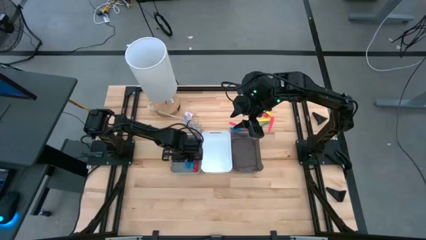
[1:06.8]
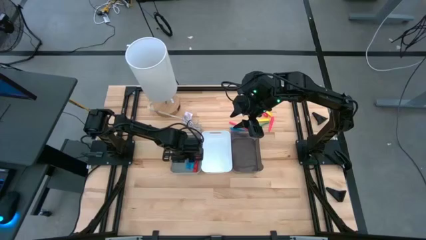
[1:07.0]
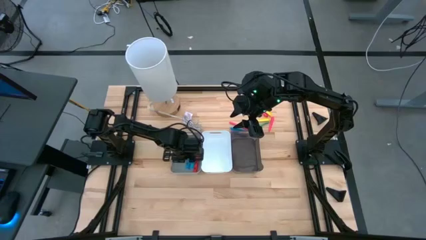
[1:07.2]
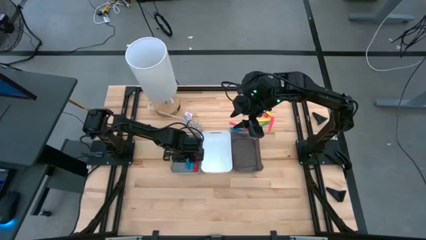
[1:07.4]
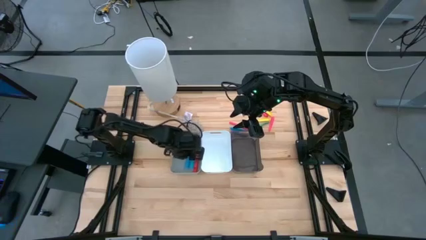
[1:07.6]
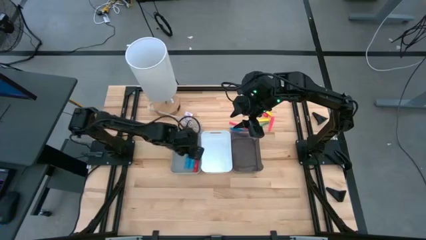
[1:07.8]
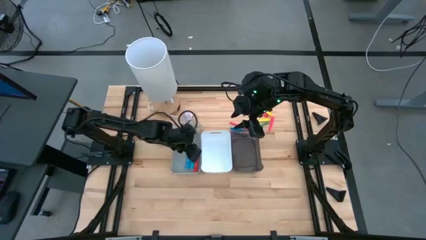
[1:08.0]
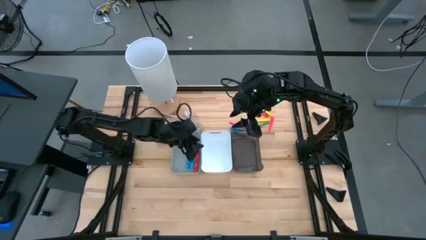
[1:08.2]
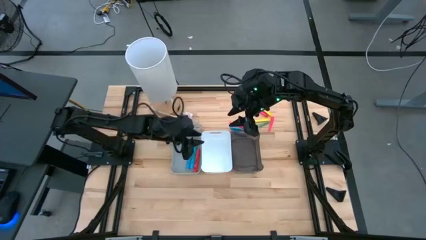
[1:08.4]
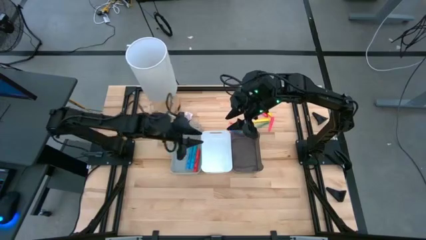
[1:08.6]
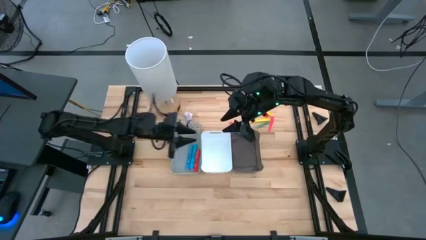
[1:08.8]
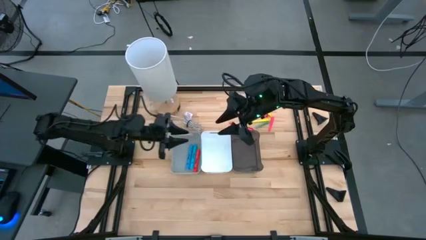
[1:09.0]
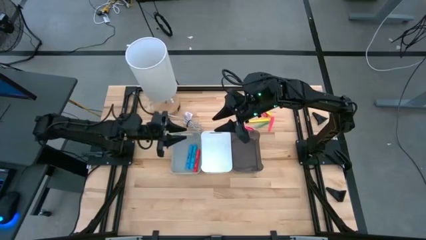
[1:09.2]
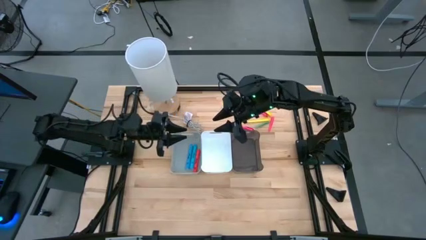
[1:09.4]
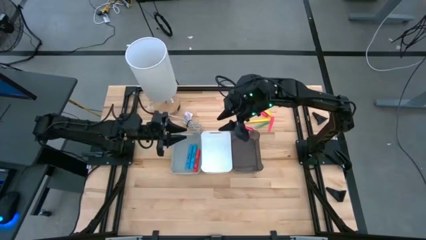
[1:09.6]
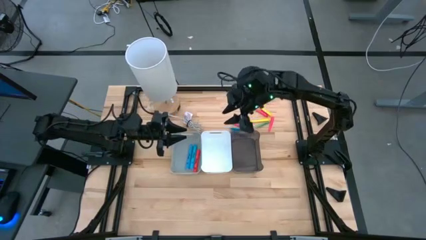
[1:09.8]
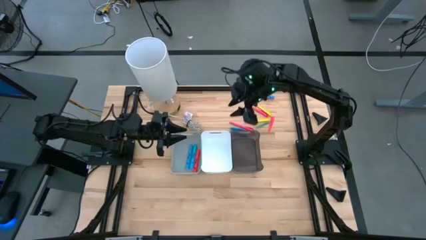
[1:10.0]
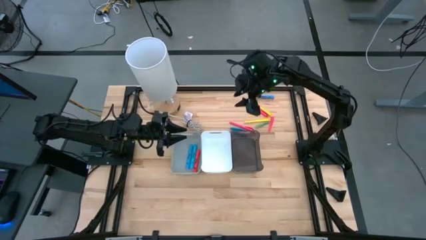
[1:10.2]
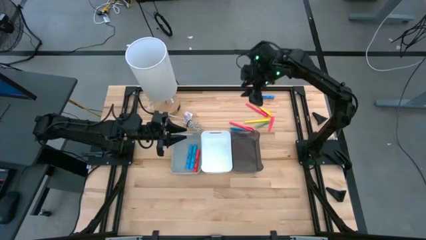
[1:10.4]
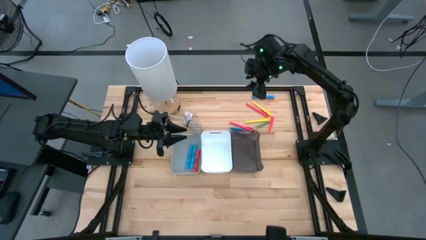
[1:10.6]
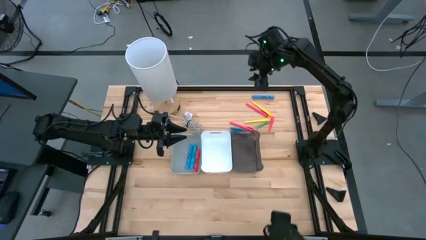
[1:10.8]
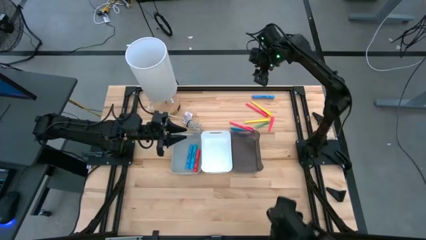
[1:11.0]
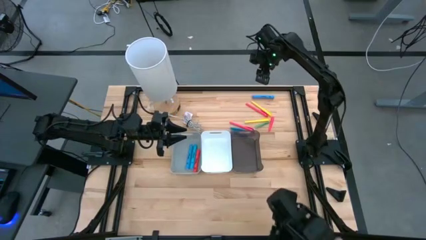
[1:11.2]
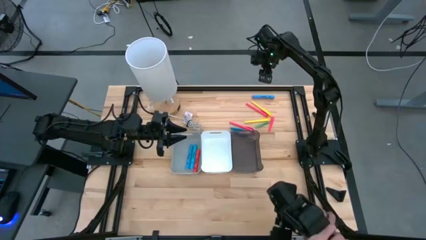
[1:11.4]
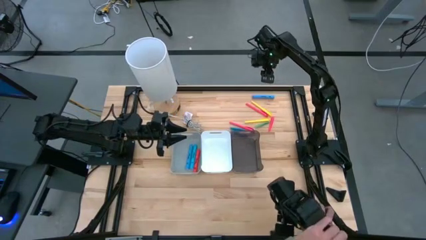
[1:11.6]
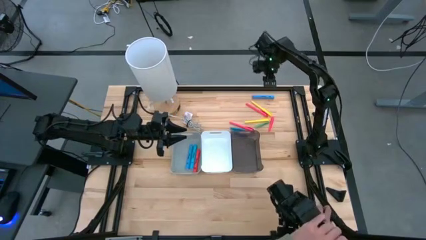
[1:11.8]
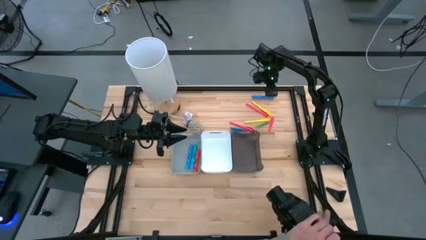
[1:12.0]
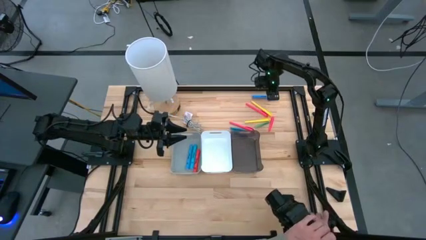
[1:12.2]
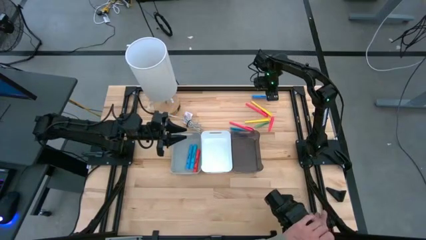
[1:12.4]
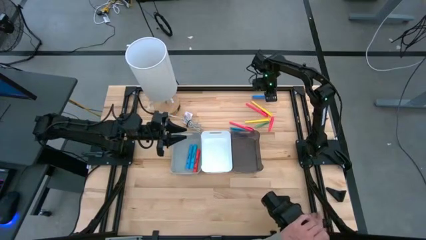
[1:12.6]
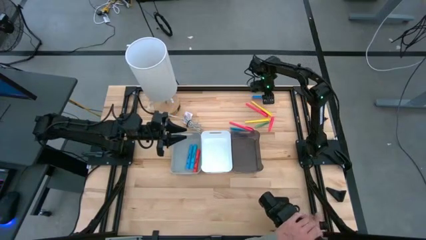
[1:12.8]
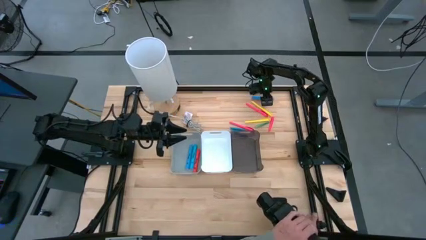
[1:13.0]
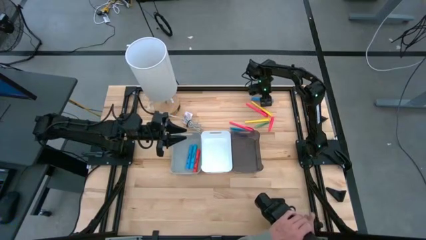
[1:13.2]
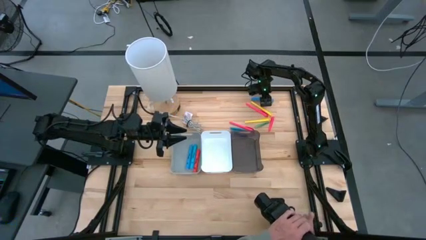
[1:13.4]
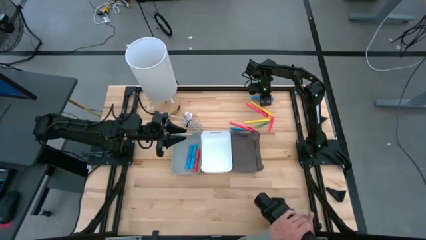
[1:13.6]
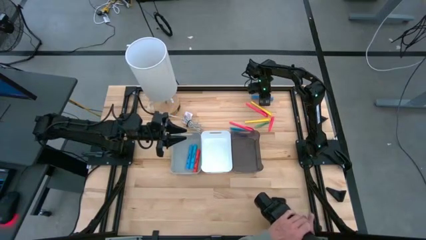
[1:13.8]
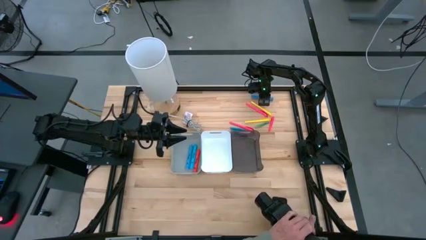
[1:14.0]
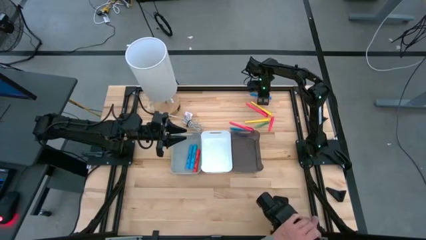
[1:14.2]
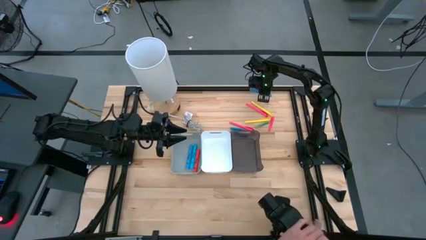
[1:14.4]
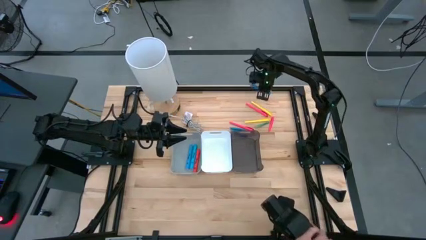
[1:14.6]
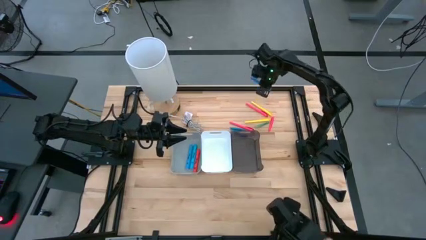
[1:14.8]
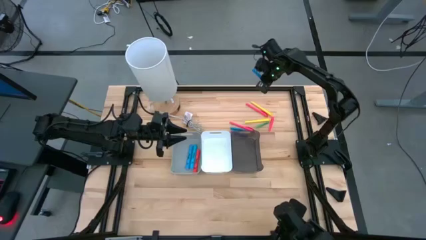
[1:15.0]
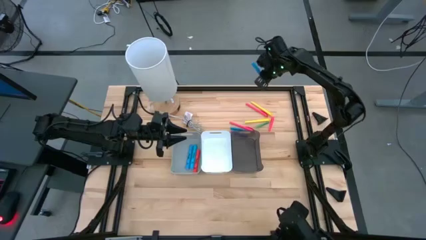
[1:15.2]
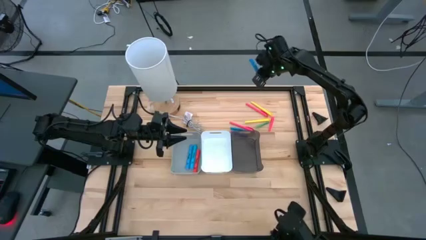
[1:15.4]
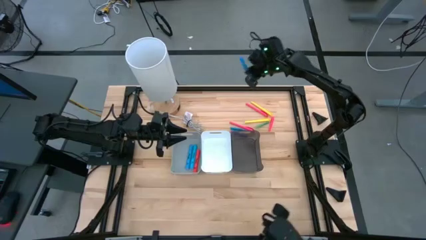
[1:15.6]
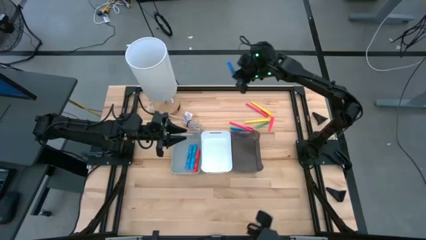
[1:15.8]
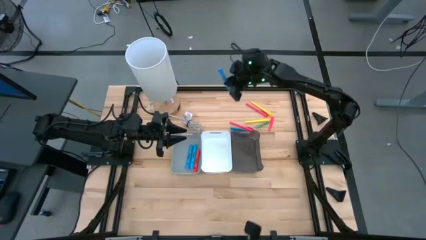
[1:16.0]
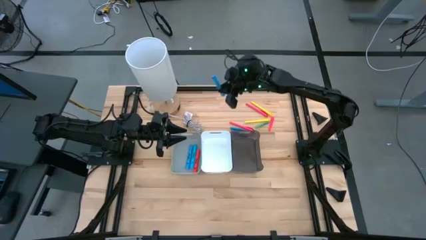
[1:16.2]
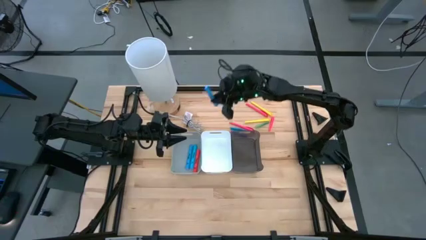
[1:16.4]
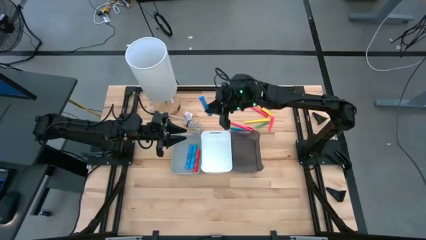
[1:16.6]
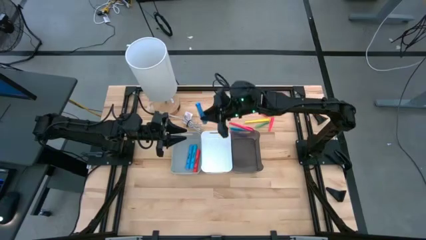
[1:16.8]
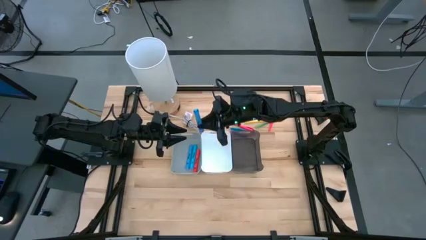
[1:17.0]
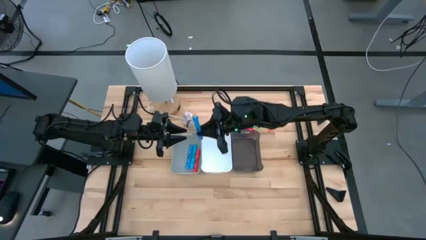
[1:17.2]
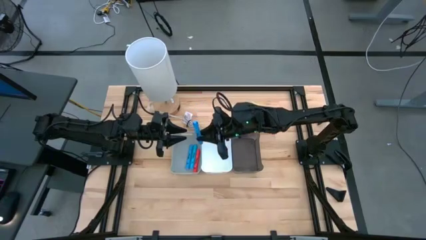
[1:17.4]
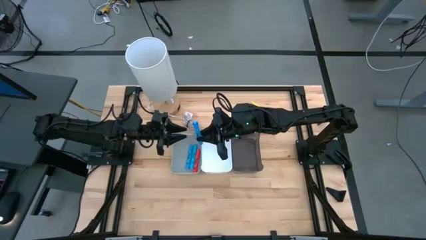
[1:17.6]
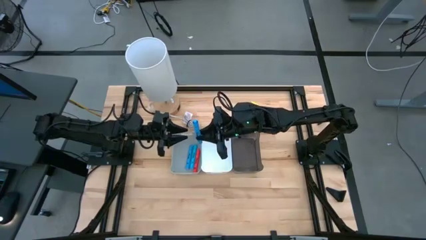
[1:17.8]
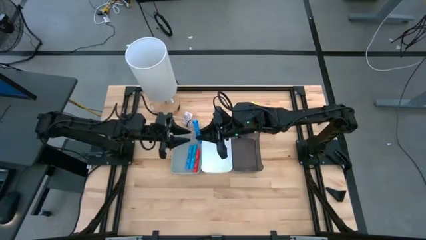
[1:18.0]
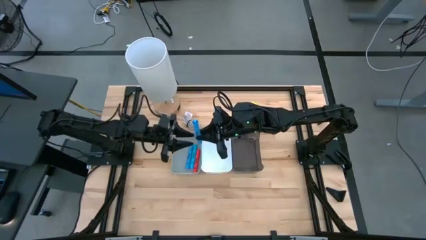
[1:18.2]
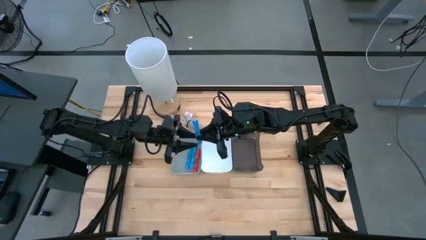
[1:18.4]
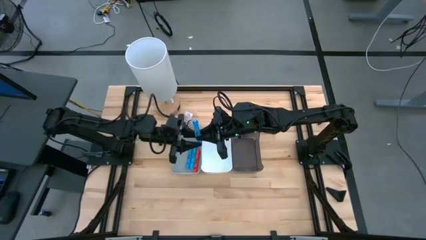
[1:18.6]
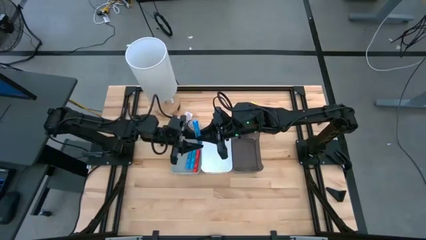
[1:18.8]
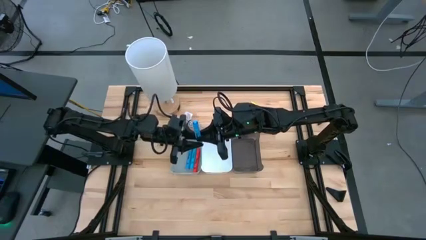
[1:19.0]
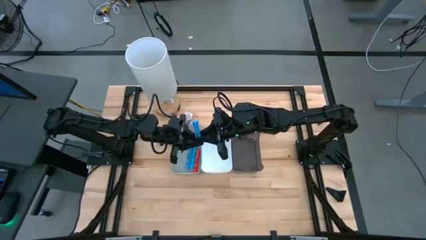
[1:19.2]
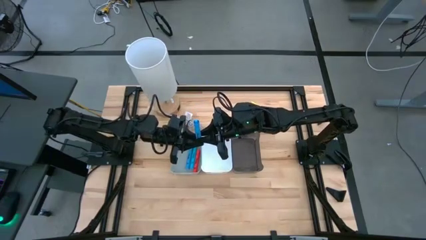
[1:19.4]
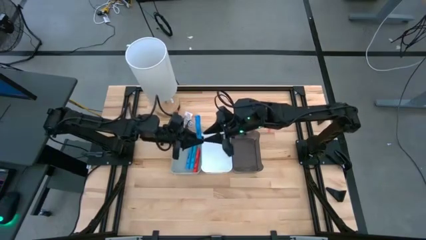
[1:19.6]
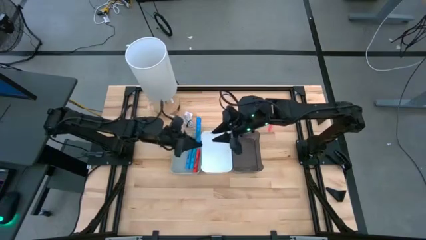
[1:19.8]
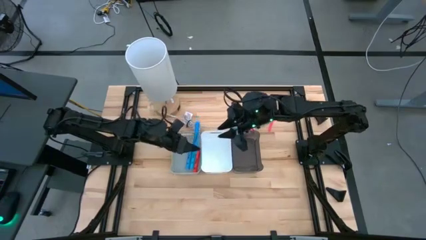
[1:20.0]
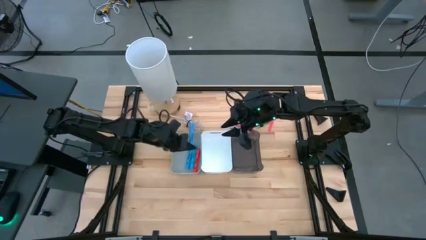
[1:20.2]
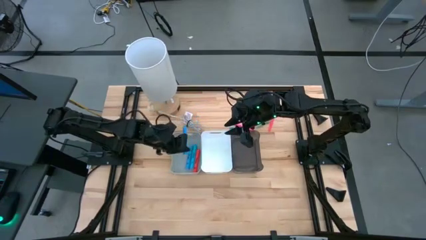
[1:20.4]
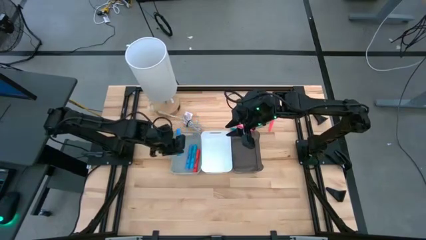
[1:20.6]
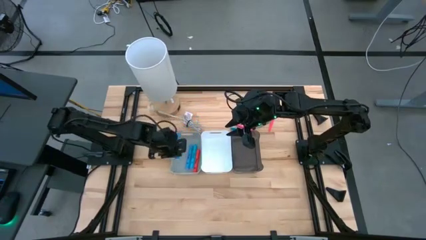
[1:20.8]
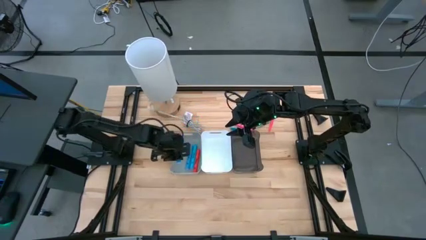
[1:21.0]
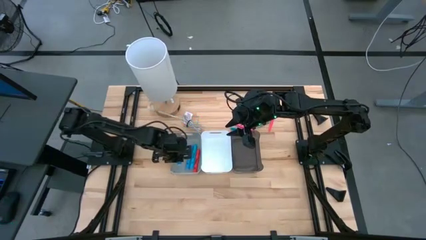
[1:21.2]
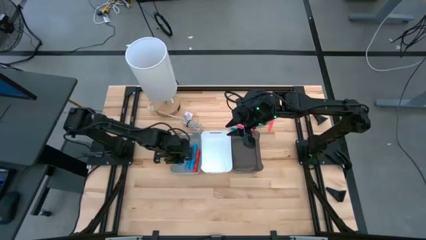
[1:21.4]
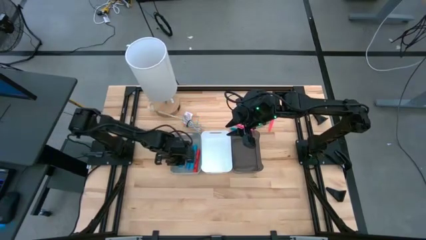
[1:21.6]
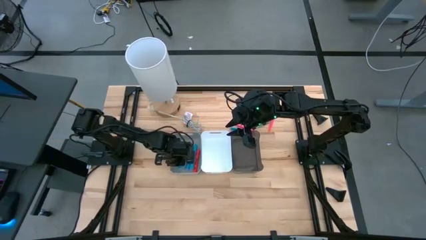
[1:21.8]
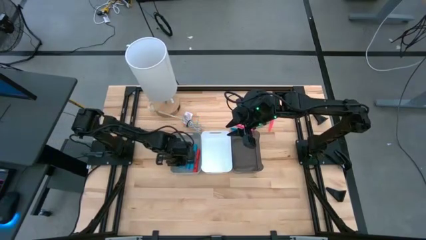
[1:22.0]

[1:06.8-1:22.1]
Task: Pick & Place Markers
Put the blue marker into the gray bin

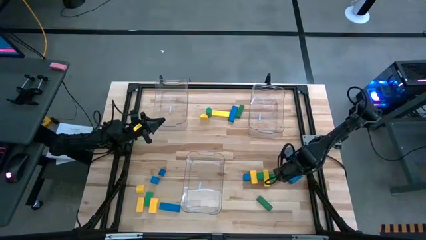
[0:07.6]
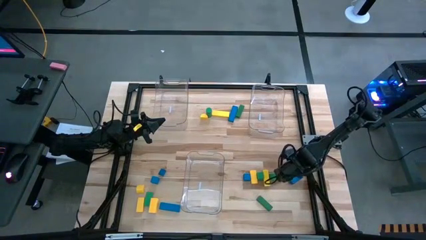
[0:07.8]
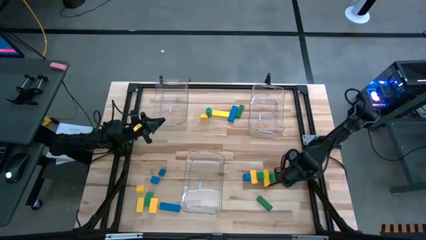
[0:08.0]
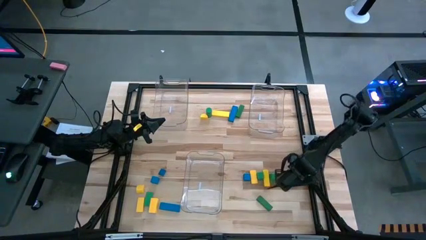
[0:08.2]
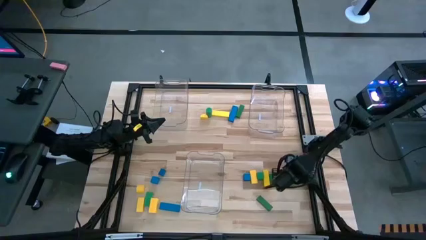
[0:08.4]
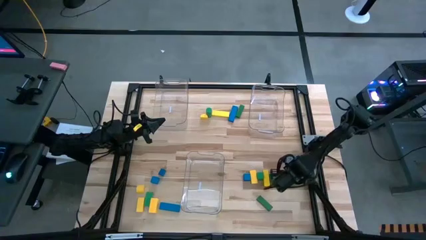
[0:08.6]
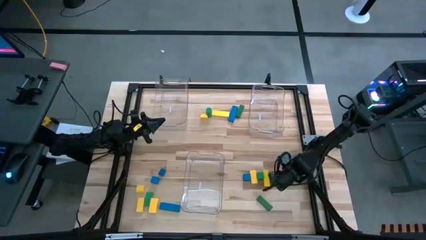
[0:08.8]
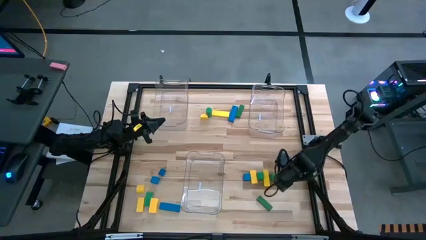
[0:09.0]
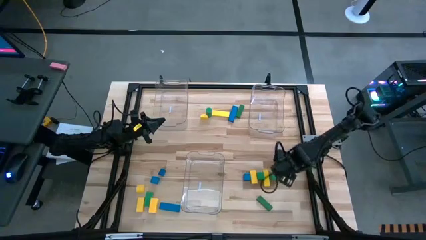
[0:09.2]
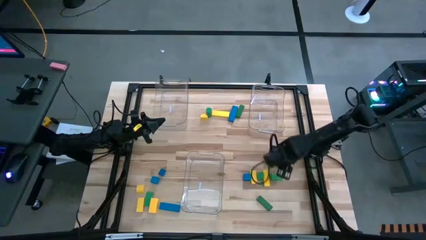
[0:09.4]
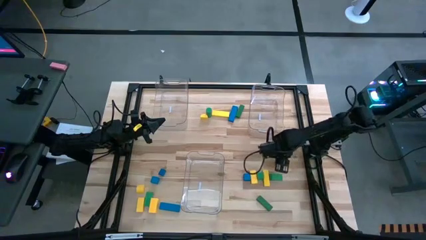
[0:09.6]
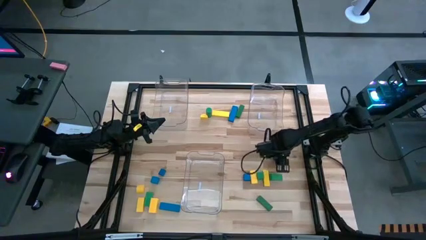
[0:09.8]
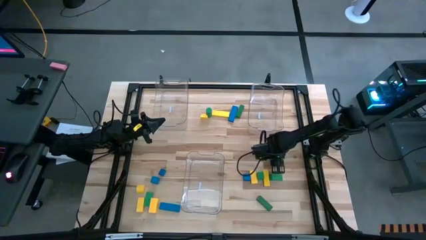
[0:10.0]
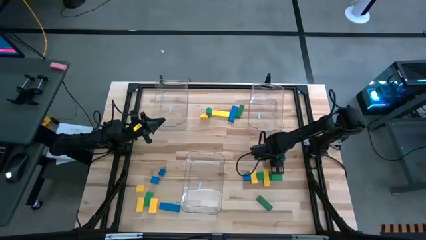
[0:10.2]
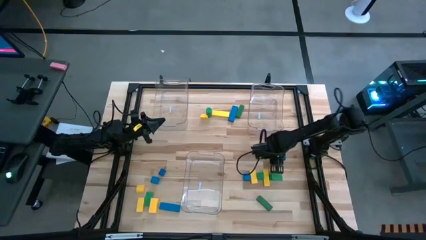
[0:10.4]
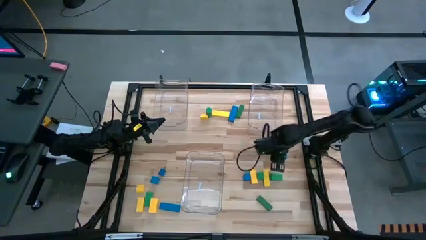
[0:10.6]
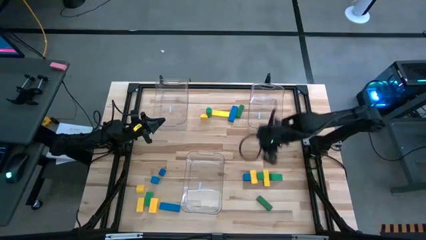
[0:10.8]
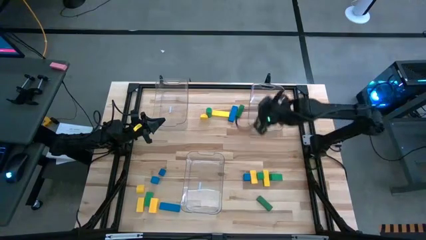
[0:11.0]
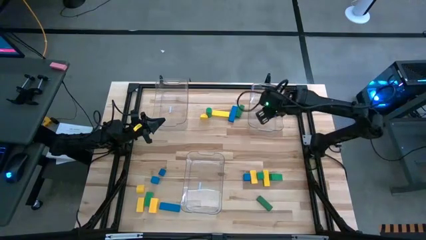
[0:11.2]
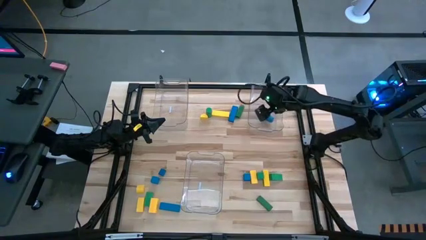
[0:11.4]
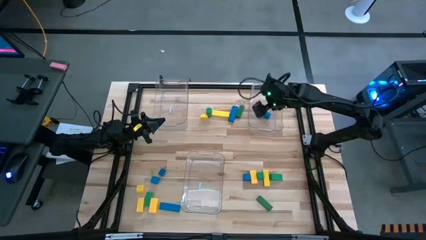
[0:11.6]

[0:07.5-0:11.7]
Task: Sort blocks
Put the blue block into the top right transparent bin
